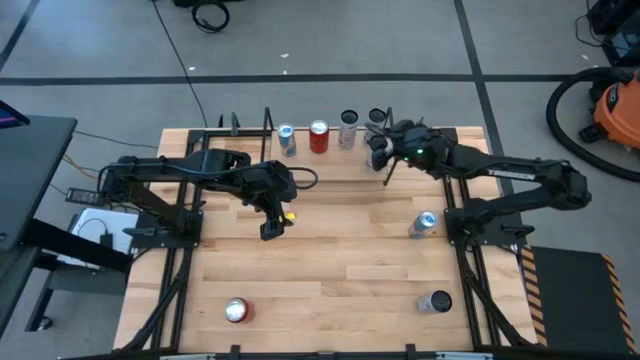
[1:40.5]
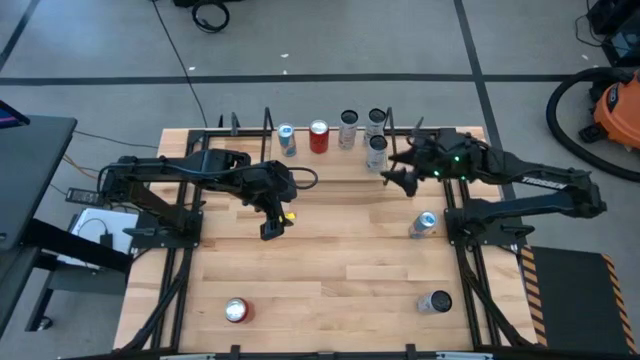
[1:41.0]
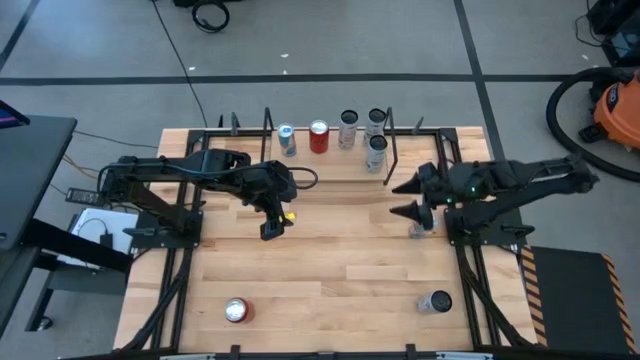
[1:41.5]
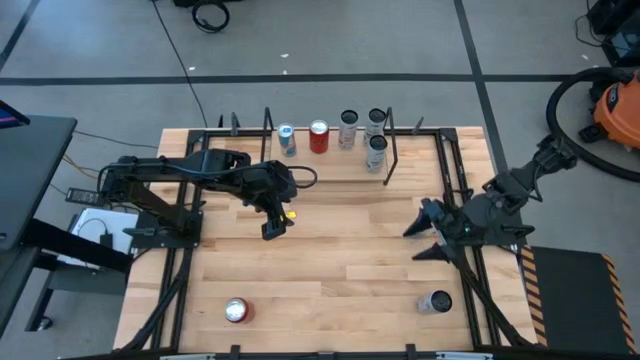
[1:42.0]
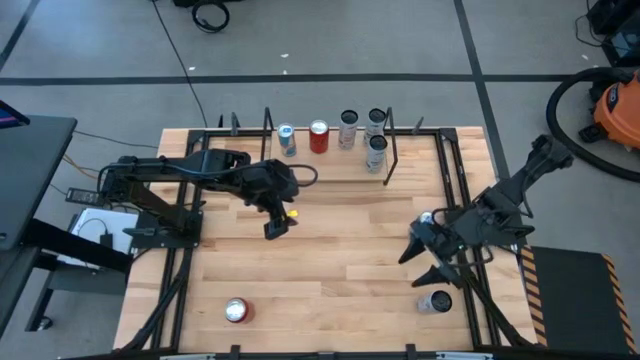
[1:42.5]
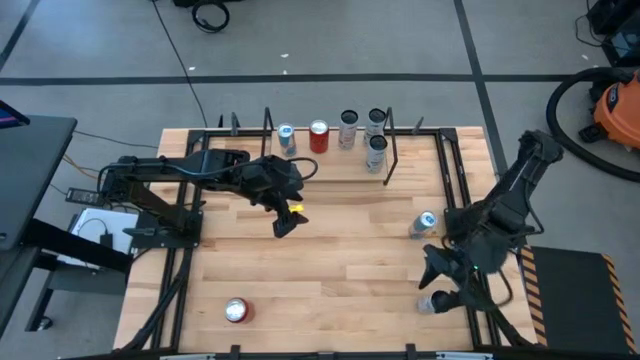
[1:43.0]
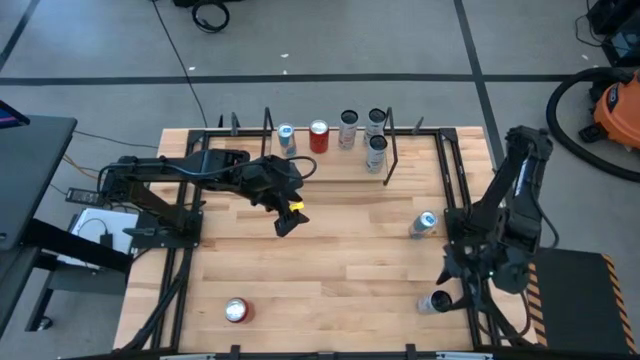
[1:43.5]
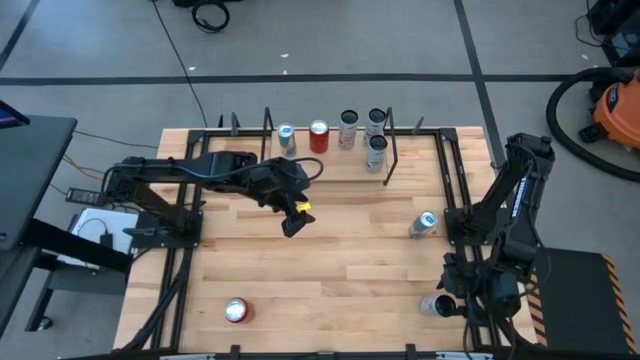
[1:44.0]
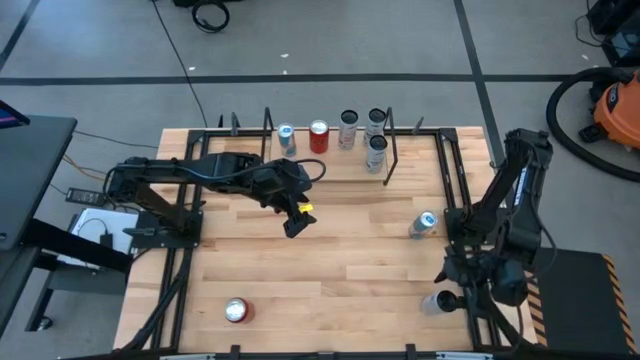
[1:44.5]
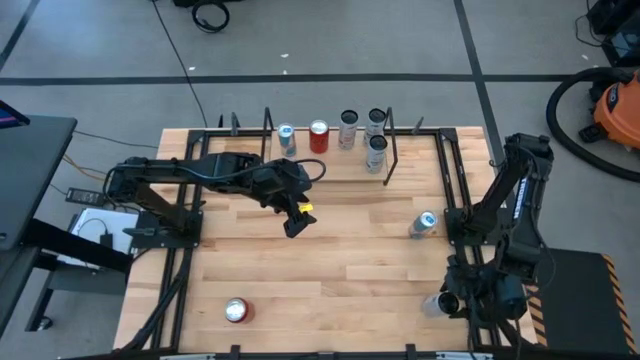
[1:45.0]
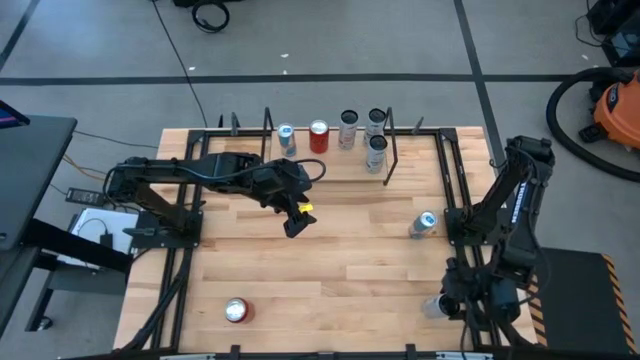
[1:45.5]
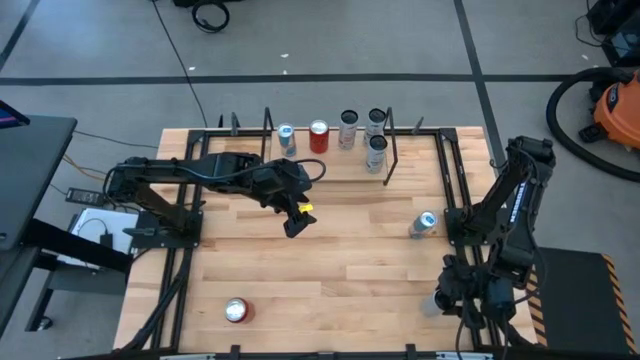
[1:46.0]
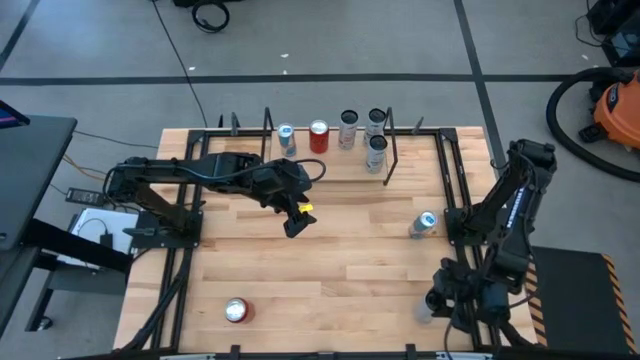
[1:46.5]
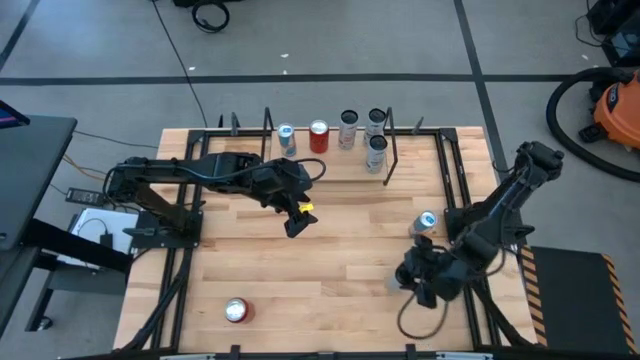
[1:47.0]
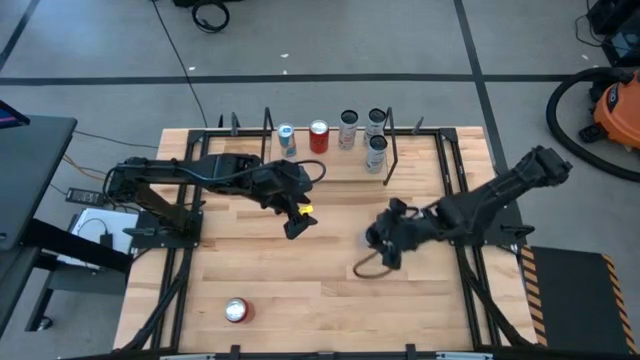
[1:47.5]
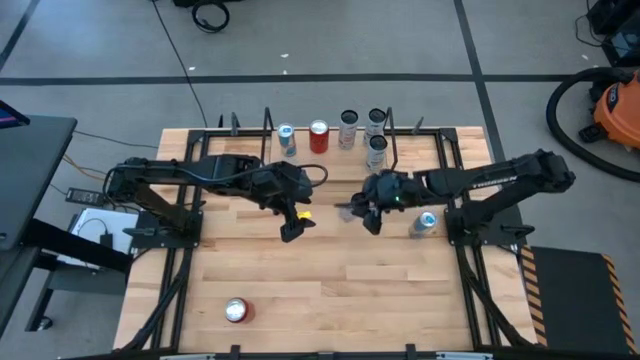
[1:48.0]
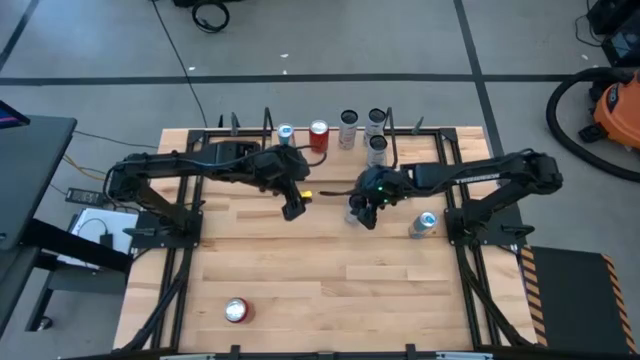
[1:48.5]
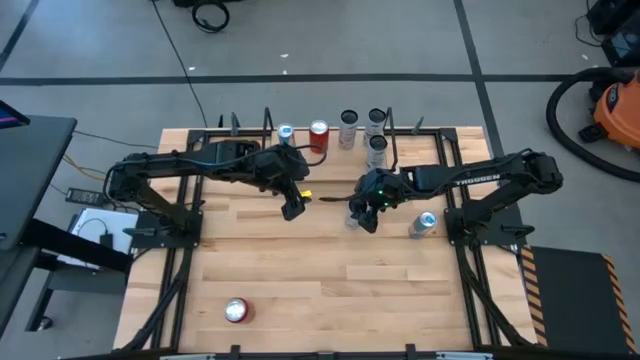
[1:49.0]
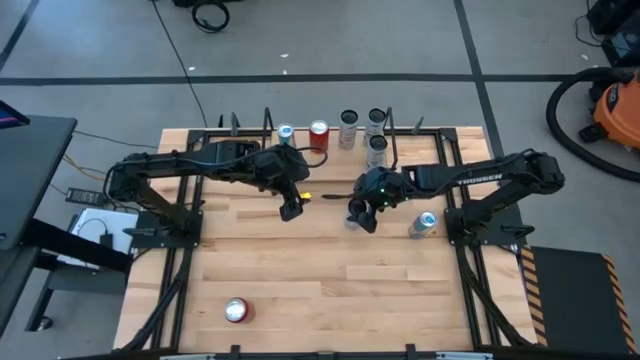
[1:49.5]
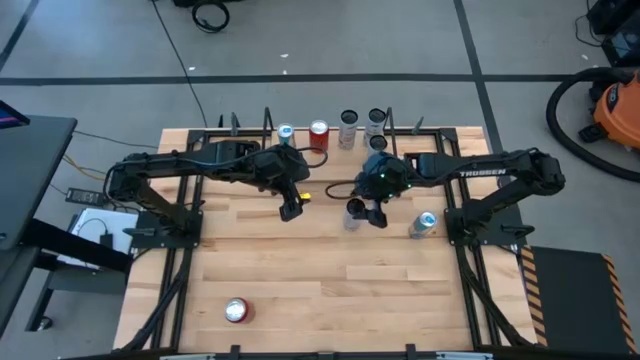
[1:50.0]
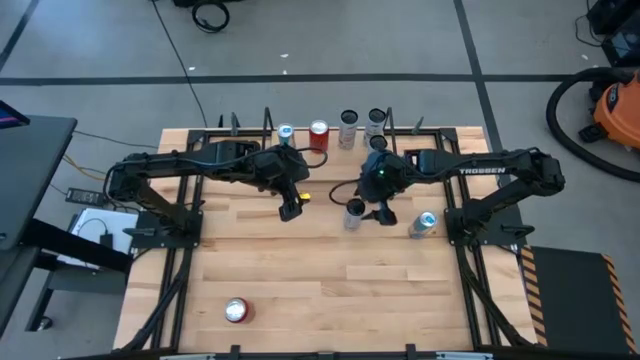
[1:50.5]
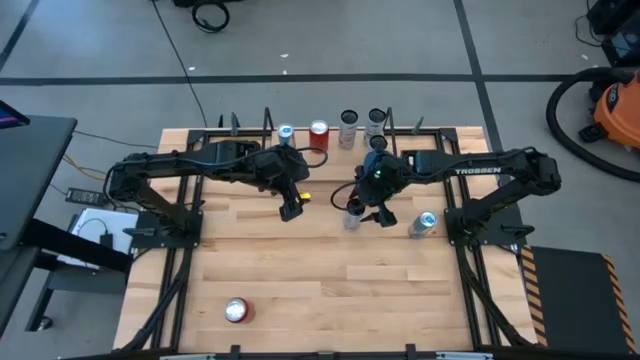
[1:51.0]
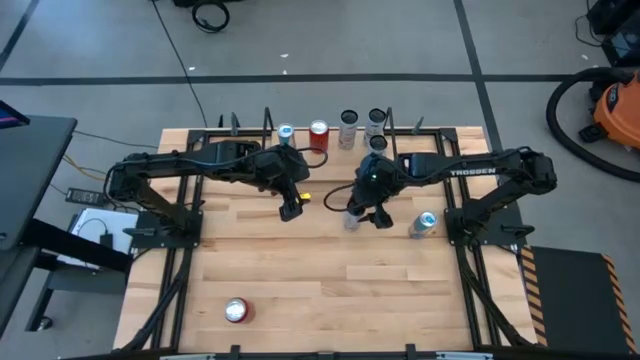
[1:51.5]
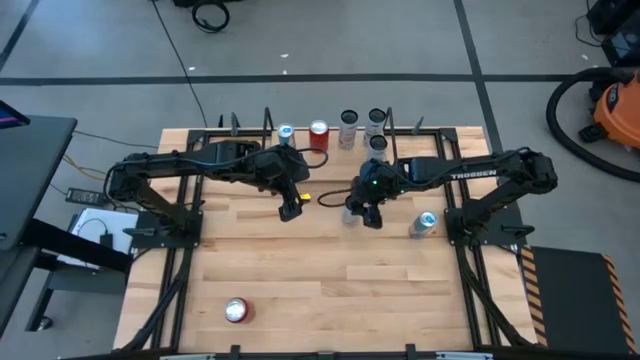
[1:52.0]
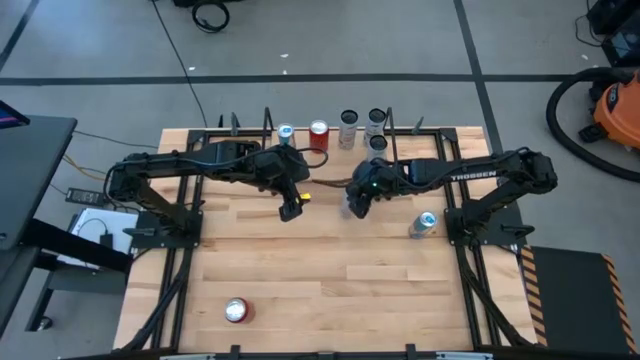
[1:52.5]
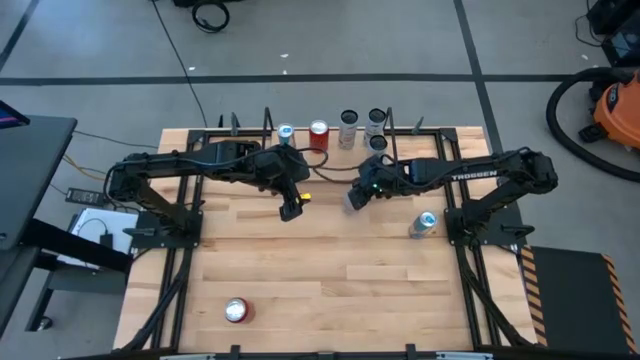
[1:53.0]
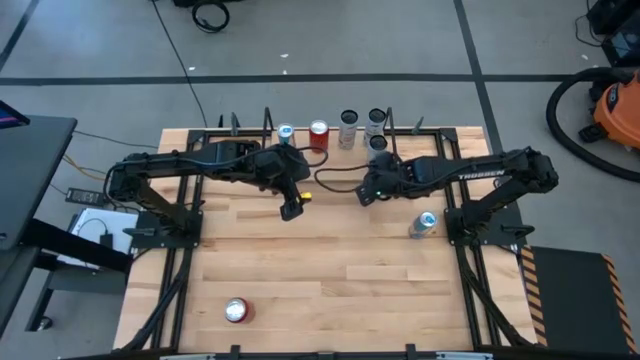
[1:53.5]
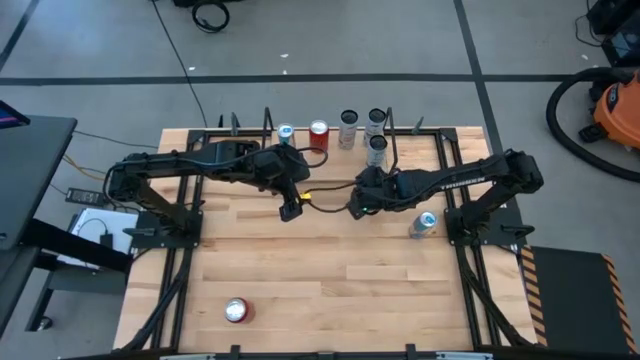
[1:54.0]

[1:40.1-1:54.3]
Task: Place canned beverage on shelf
Put the white-pink soda can on the shelf aligned with the other white-pink soda can

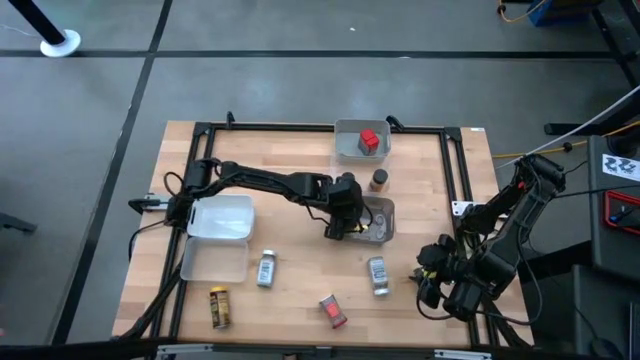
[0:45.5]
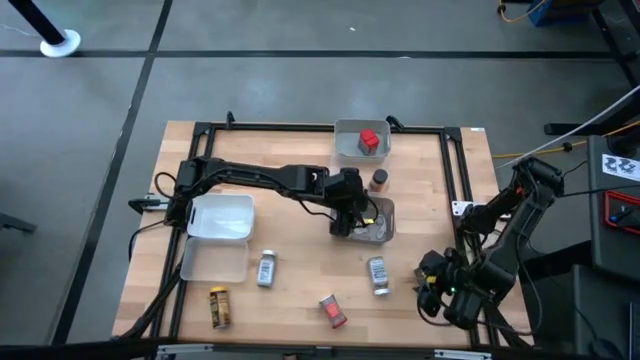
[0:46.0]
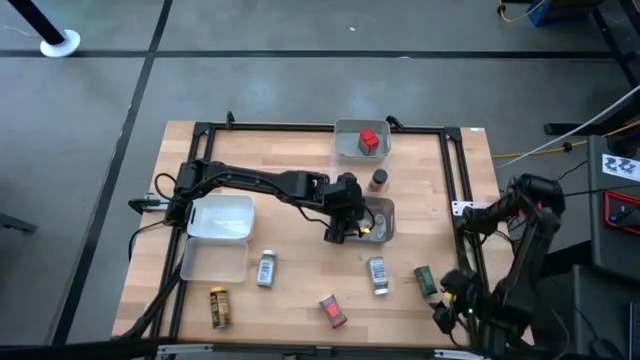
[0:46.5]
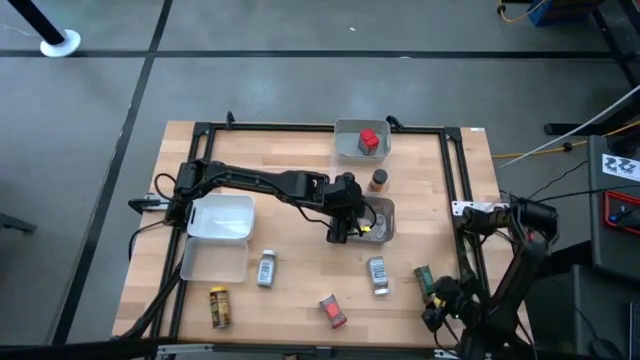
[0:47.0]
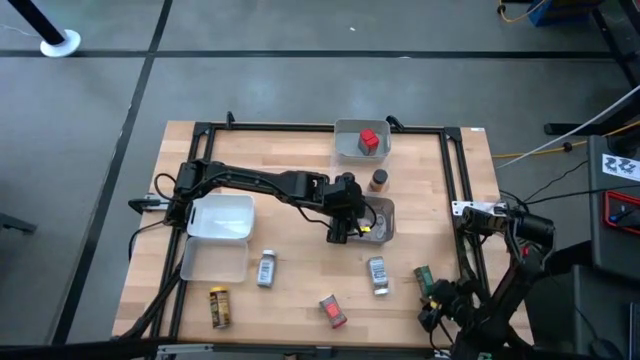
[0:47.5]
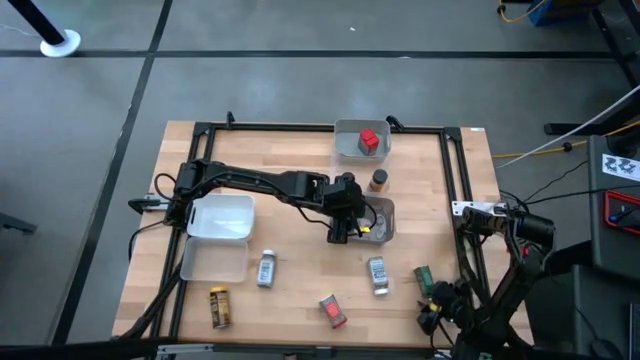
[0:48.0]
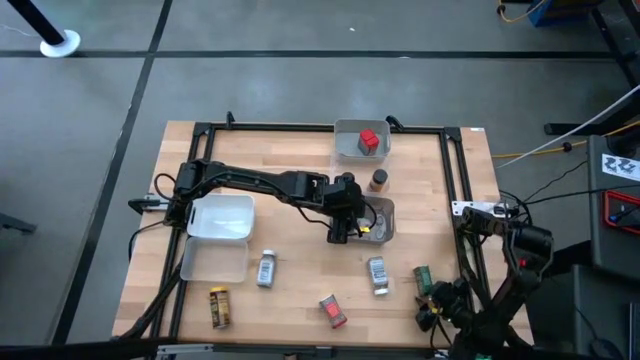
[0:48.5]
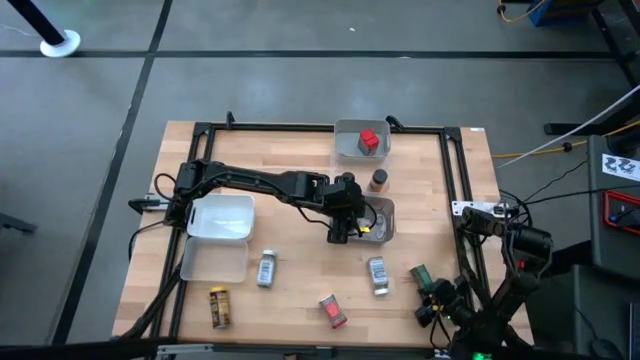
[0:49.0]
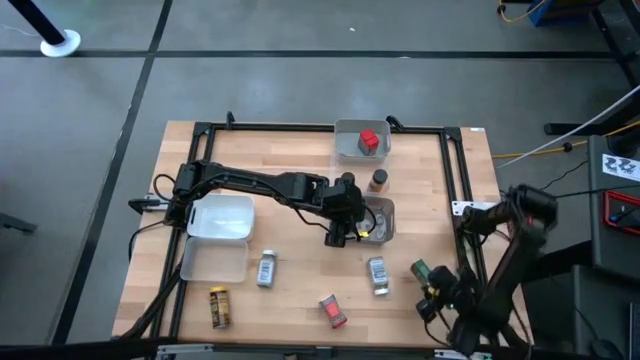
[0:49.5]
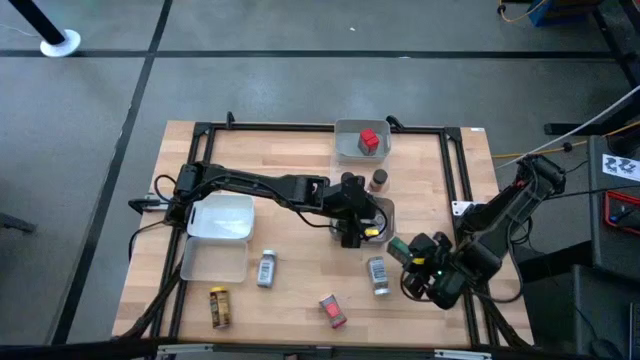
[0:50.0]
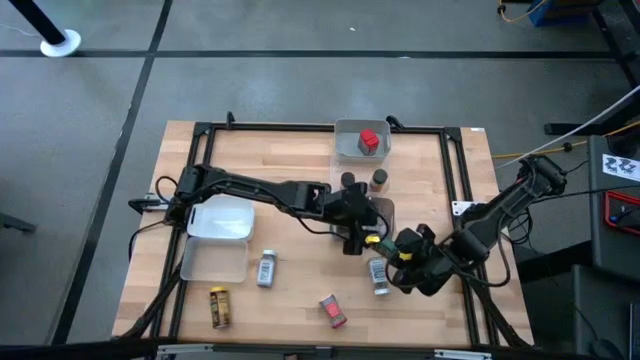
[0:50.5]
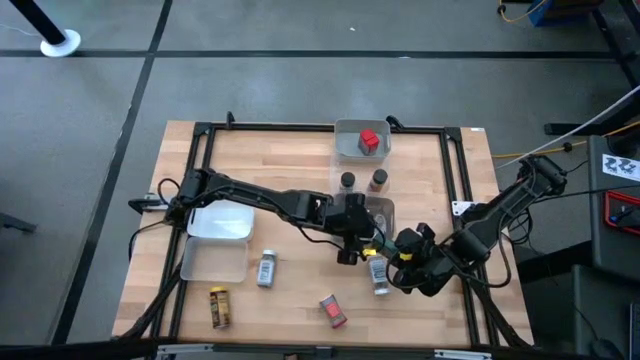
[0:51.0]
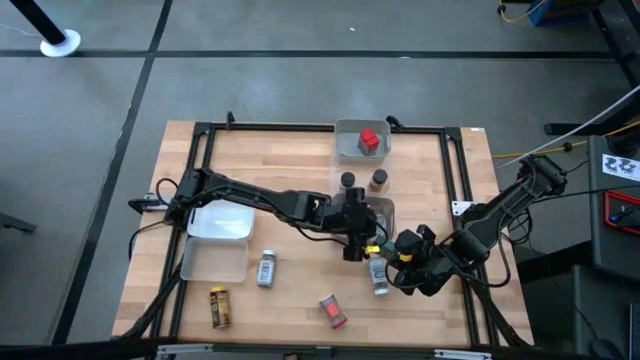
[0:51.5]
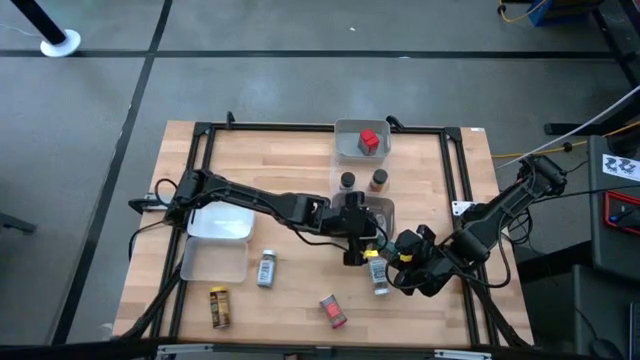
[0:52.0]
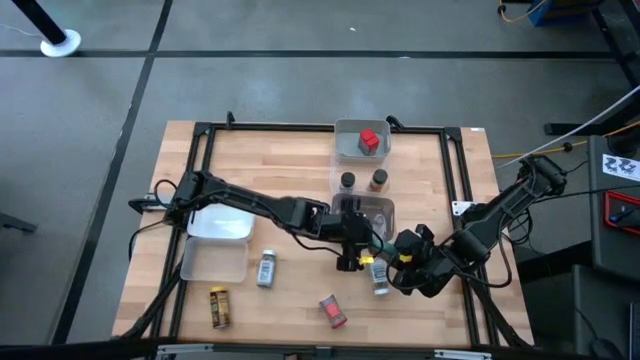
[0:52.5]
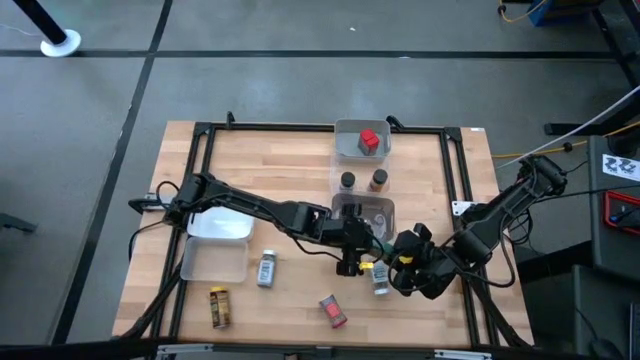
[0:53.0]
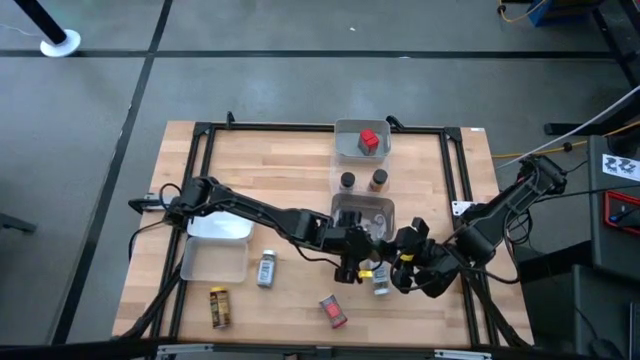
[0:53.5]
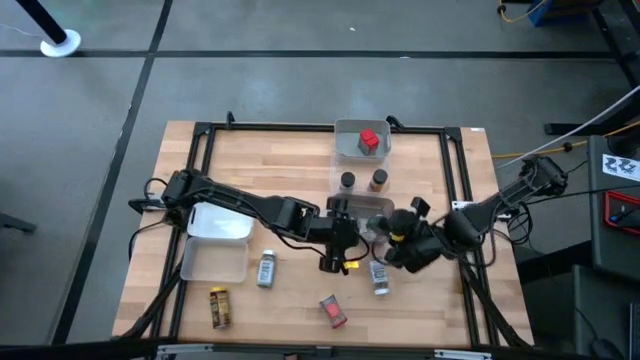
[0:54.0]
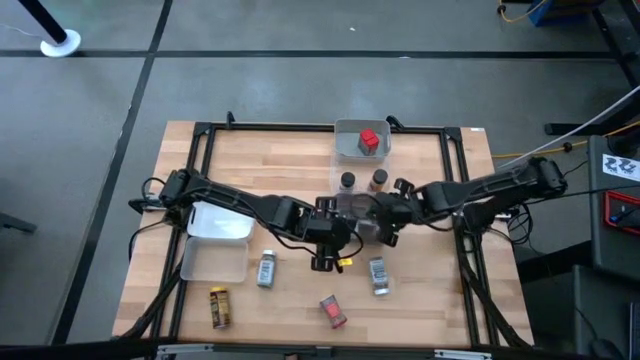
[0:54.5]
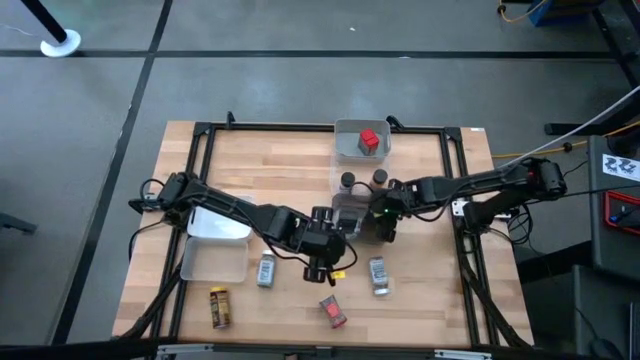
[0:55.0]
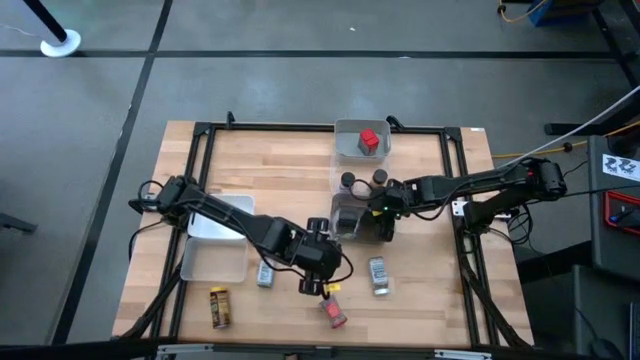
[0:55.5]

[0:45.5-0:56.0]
Task: Sort spices by type
Put the black seasoning can into the black bin
